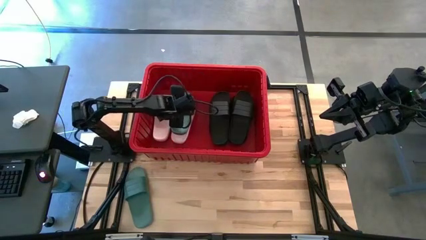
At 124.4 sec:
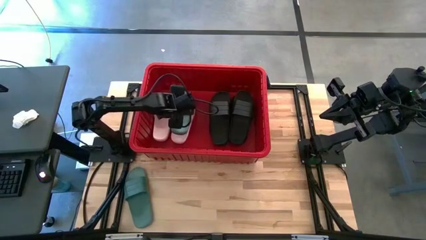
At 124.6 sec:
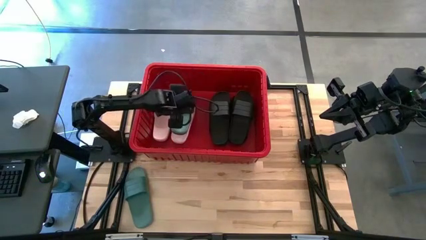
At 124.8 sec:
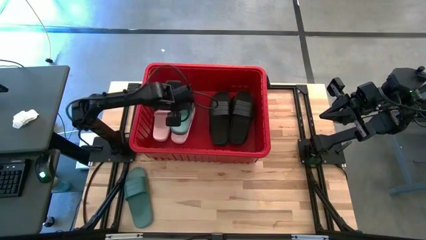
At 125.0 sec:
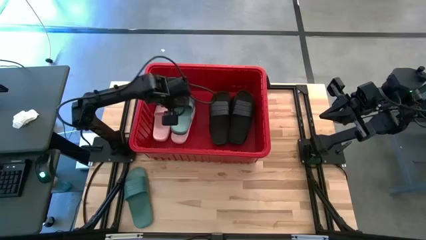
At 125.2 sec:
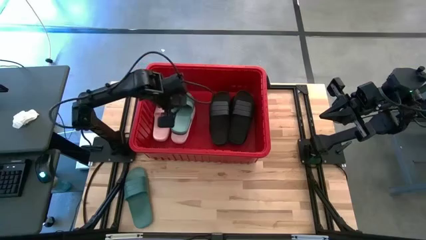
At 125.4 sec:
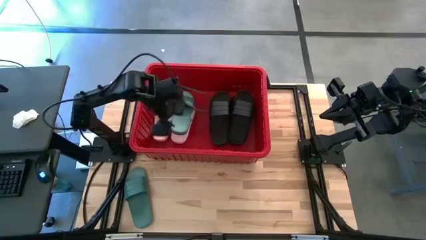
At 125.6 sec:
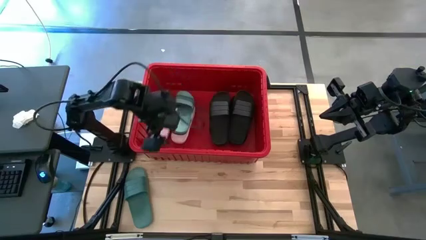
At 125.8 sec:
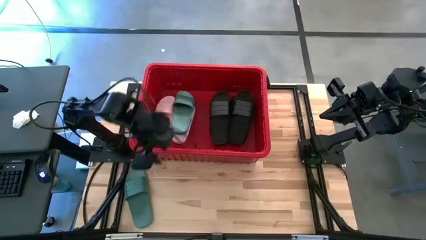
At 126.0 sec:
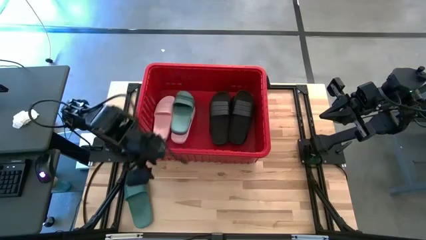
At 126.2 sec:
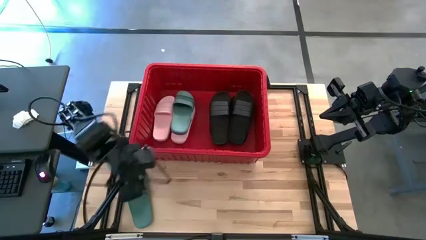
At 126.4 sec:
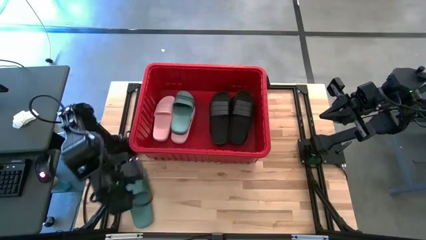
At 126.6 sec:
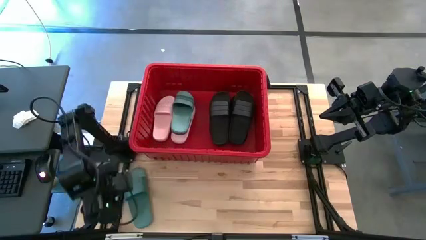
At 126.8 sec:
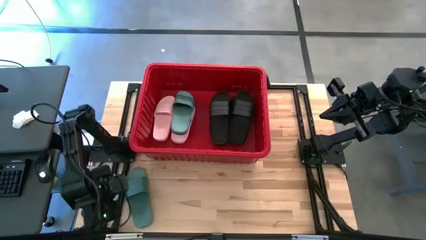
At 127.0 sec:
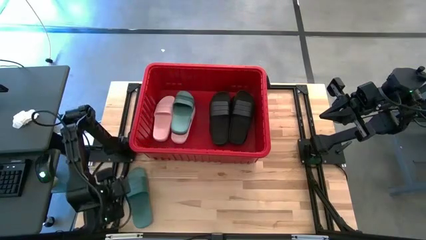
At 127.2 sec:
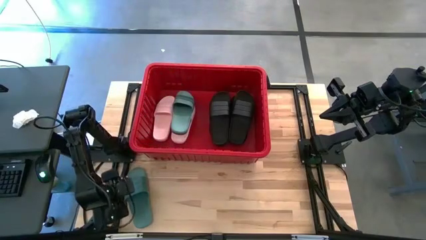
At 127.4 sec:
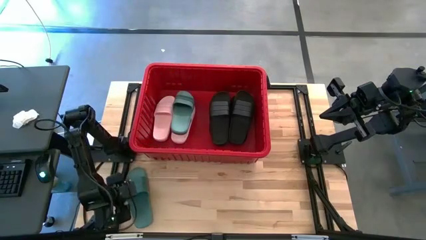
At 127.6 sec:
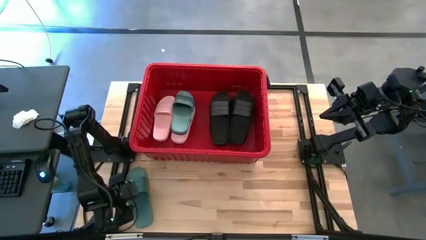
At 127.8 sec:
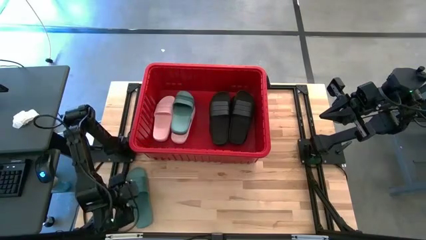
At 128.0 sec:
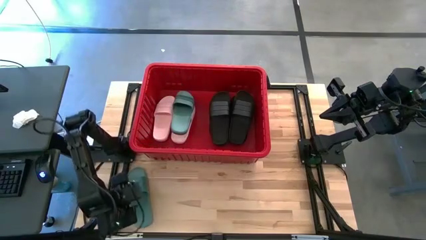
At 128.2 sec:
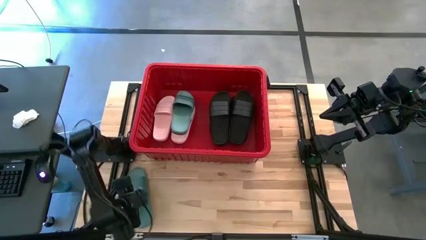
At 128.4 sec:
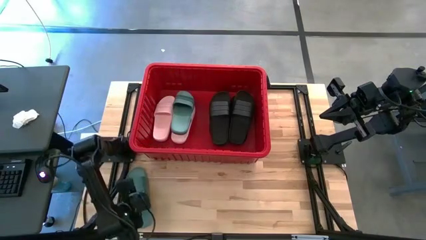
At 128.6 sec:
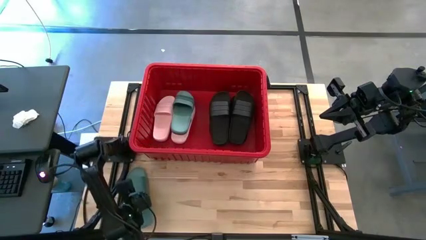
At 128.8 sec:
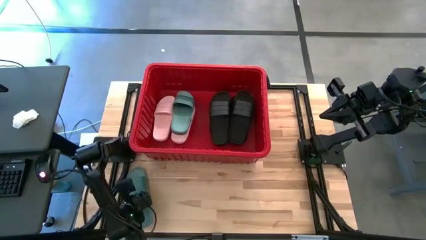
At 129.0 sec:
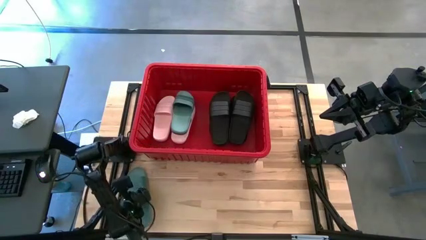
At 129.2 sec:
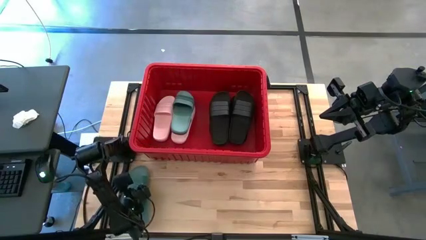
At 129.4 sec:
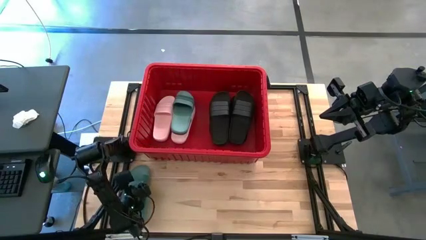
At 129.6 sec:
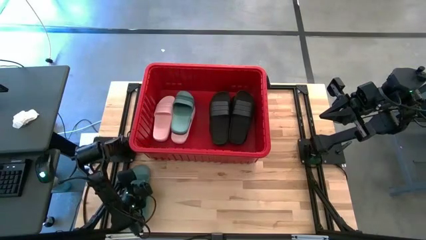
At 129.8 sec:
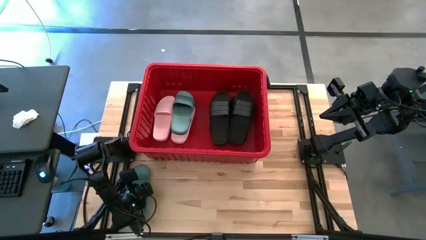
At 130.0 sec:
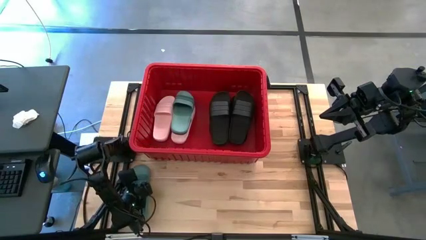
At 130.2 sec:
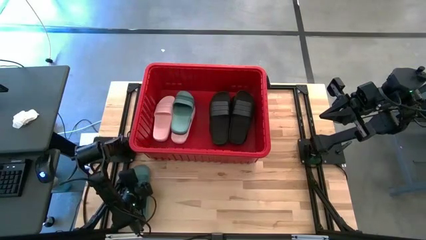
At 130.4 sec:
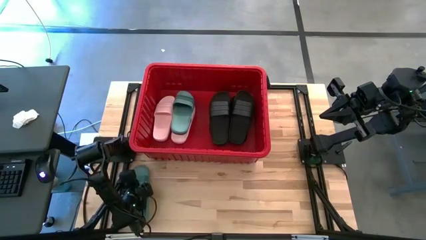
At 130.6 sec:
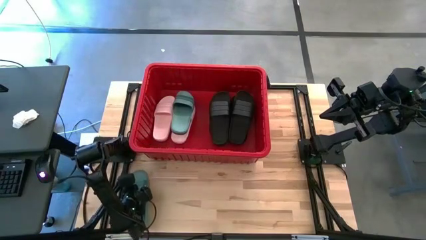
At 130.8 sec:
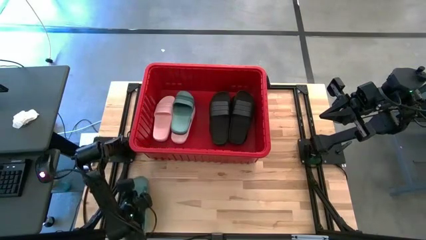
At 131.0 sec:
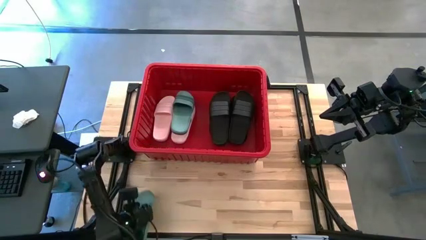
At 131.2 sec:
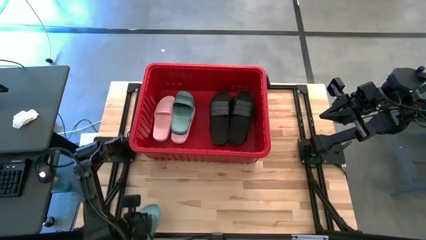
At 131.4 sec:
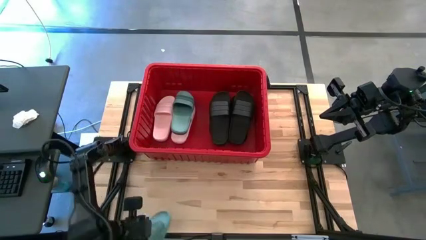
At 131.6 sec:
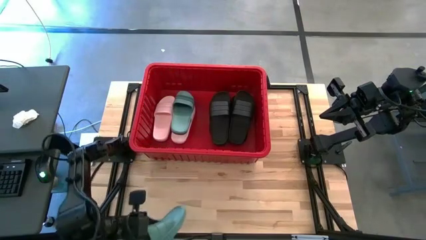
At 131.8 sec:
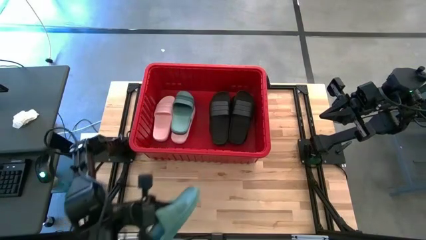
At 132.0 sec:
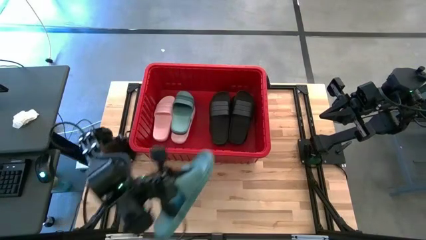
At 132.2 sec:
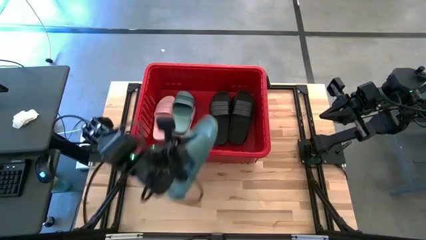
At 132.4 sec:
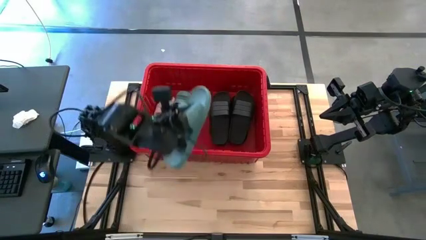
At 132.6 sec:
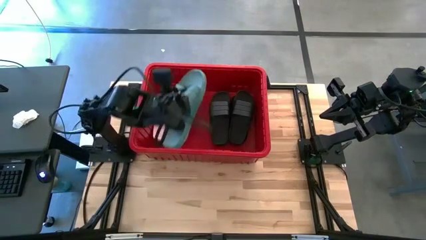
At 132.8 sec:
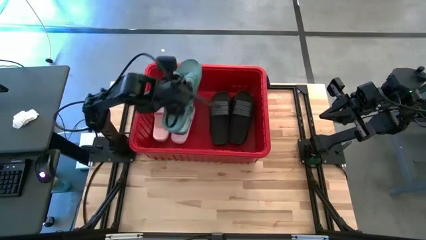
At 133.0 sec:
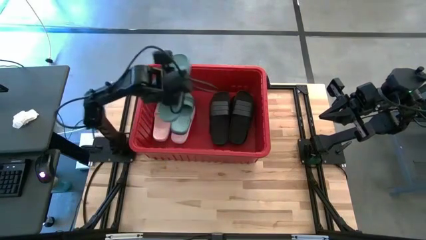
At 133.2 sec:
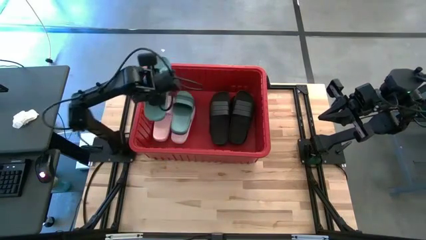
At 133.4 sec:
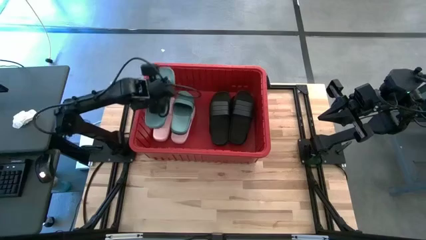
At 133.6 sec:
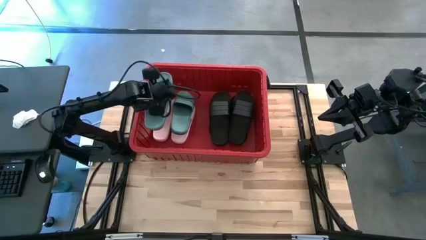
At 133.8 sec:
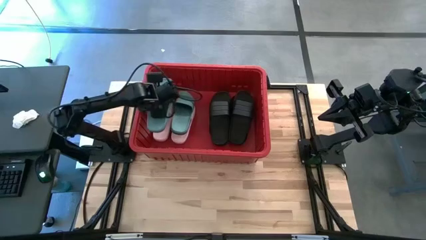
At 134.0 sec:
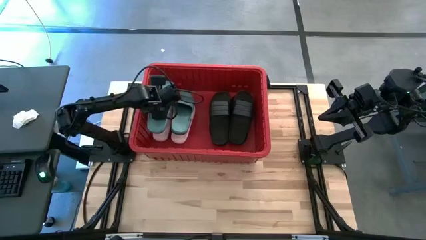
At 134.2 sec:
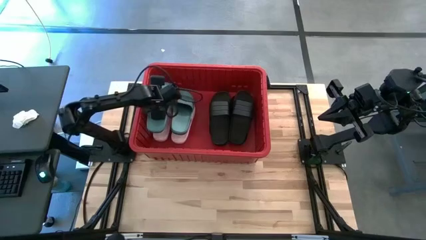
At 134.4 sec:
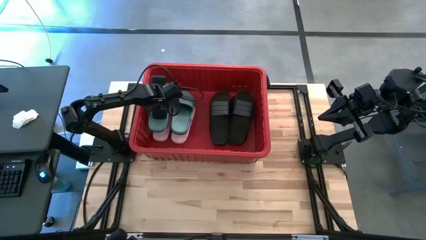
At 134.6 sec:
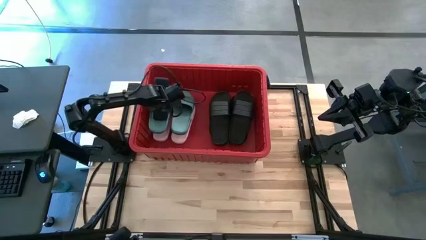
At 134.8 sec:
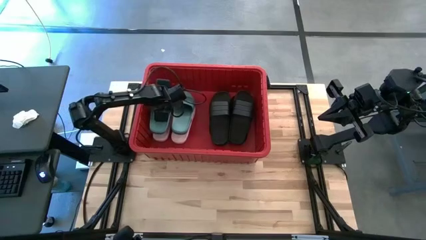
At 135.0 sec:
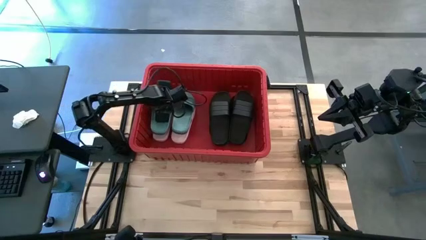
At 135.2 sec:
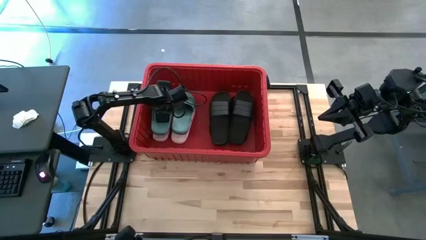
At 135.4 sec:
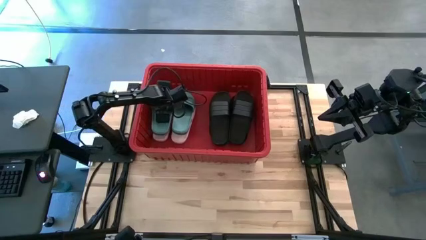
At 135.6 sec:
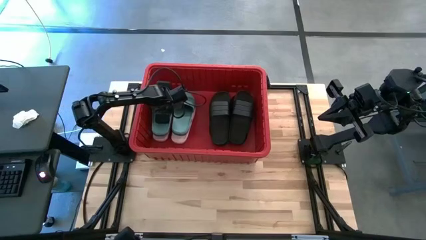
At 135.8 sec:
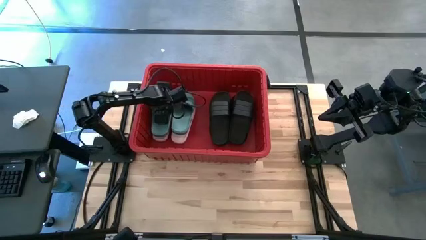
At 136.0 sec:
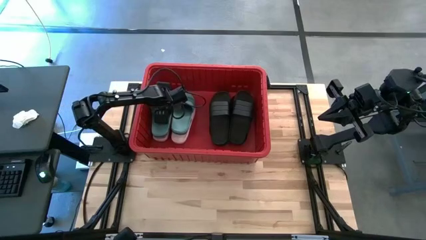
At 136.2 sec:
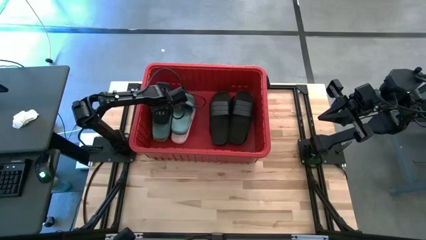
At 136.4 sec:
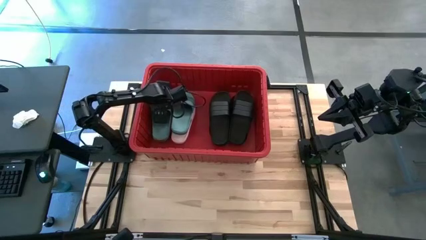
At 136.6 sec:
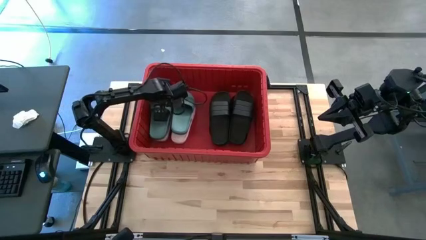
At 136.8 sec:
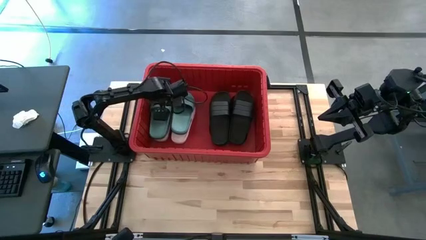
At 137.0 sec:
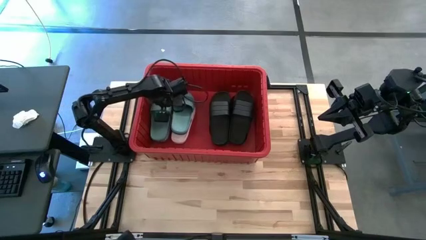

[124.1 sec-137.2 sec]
Task: Pick and place slides into bin
Put the green slide into the red bin

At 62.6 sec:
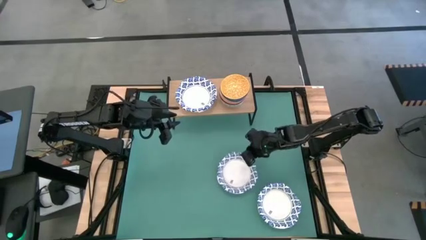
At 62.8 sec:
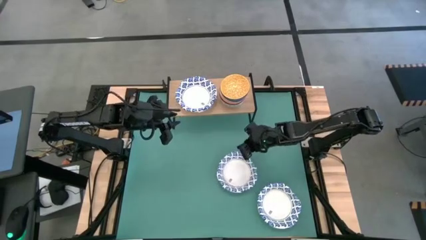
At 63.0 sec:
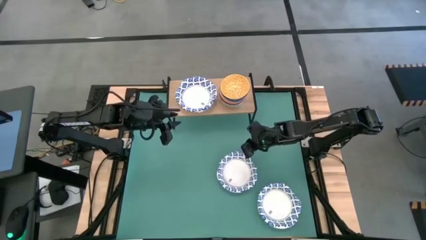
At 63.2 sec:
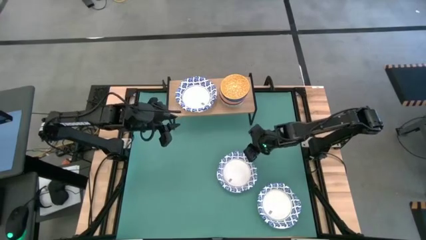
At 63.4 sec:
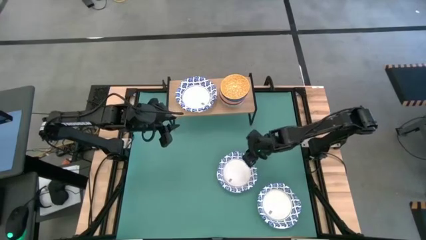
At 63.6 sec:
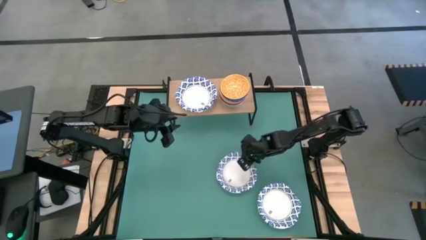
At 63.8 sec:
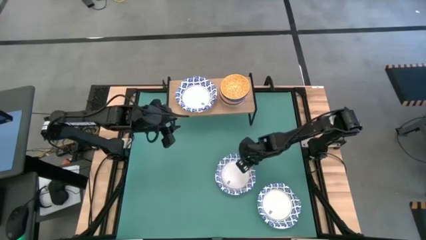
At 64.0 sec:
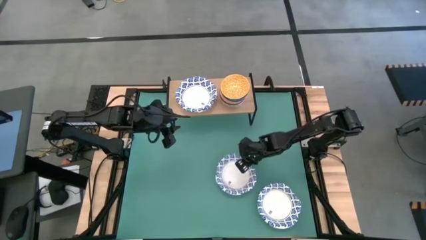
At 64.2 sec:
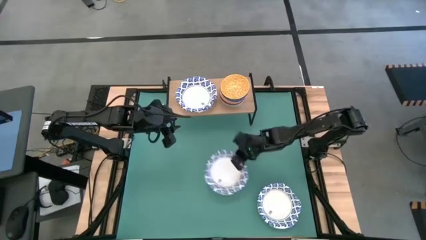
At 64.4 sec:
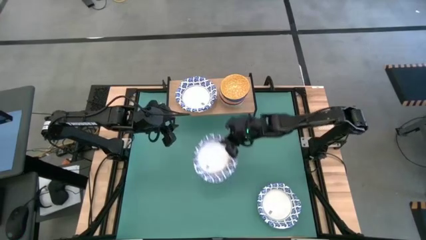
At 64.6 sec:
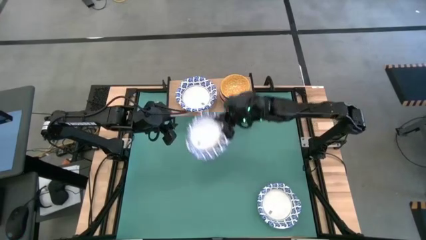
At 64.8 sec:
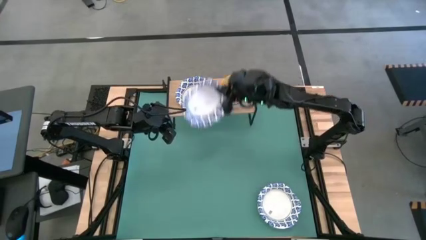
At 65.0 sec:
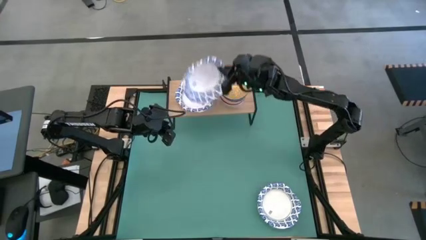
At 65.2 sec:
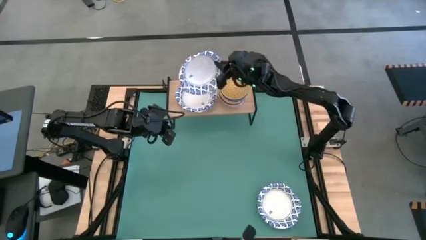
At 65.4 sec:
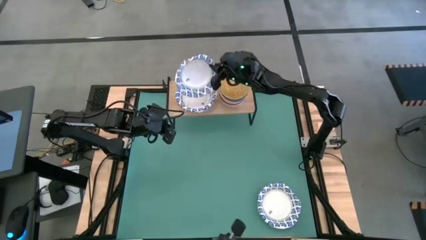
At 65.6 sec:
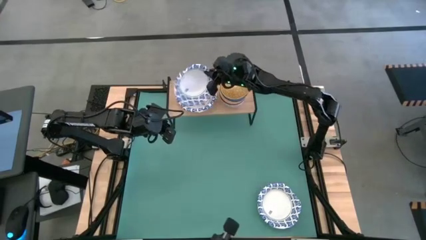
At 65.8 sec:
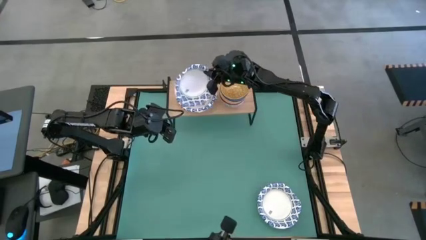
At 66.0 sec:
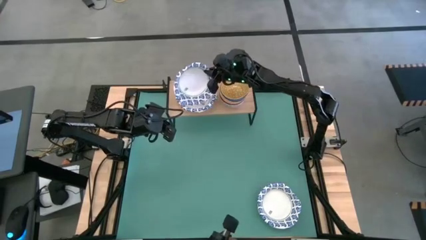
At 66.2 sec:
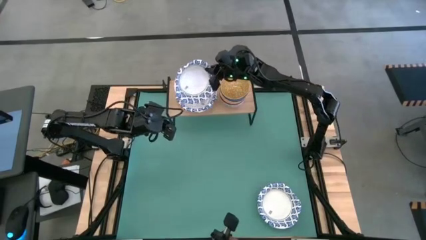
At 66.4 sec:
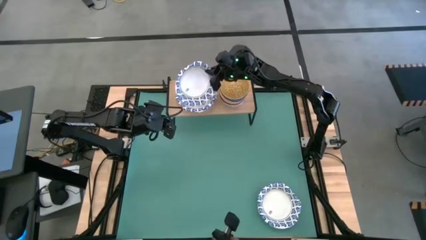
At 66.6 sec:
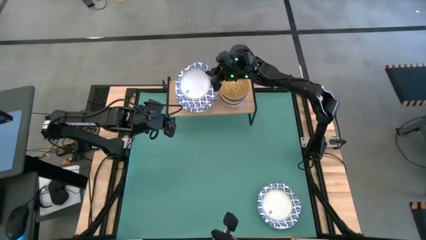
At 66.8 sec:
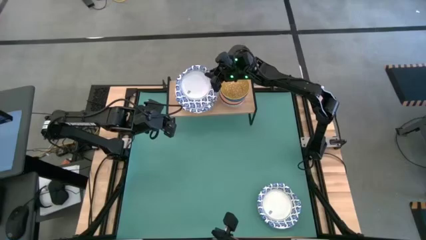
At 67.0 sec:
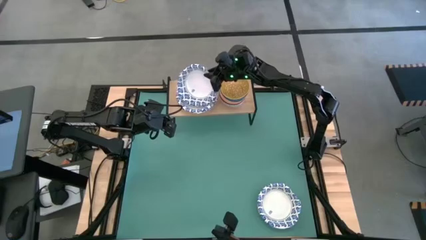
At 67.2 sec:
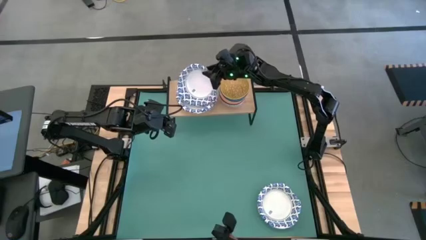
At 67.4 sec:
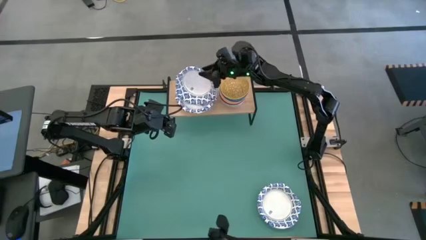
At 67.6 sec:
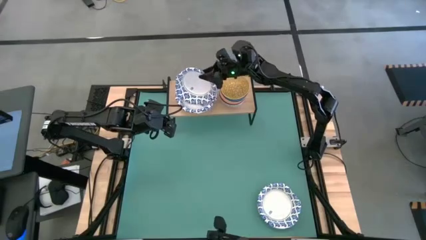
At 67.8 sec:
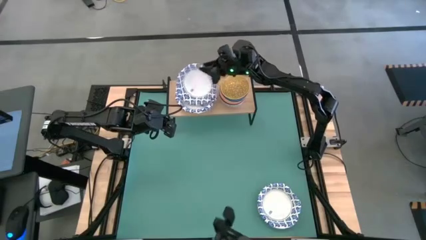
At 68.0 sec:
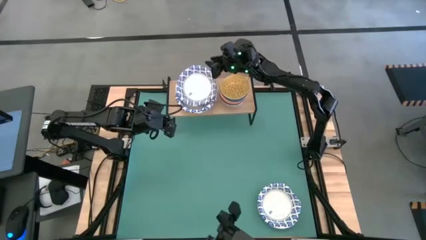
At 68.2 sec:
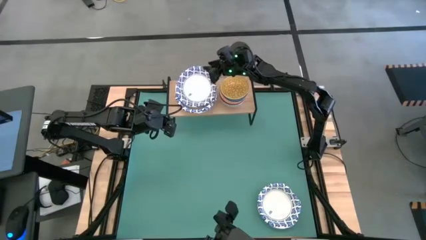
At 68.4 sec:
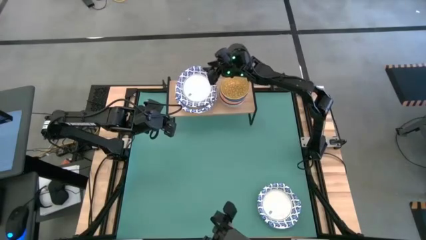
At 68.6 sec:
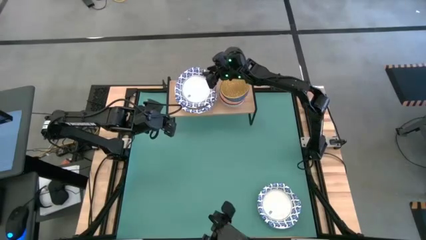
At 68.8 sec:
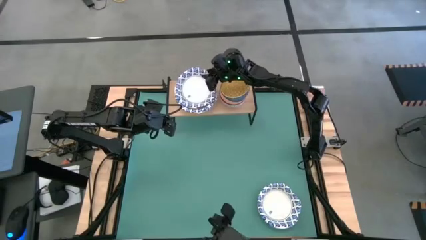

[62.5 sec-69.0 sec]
Task: Place and stack bowls onto a shelf
Stack the white bowl on top of the white bowl on the shelf
